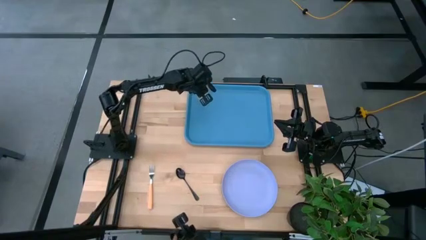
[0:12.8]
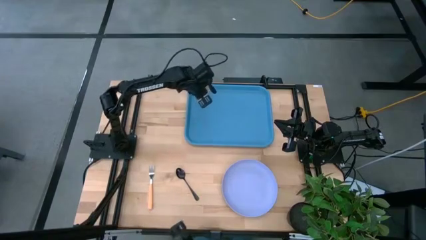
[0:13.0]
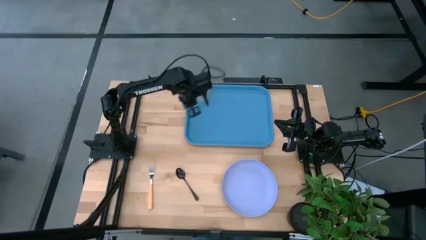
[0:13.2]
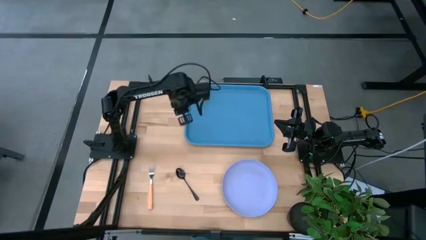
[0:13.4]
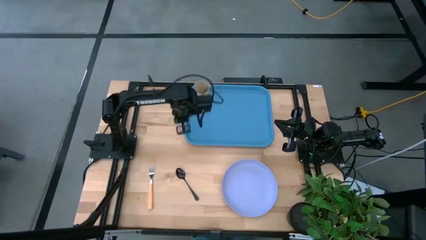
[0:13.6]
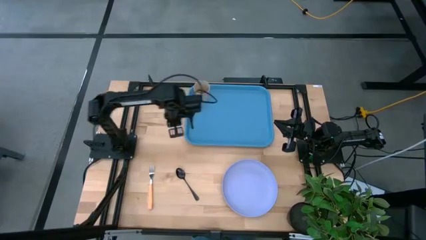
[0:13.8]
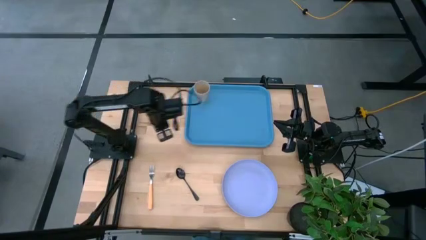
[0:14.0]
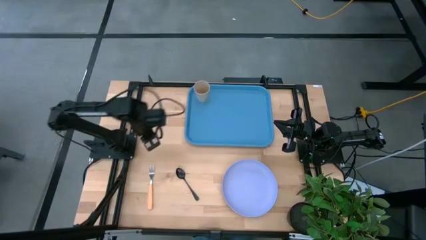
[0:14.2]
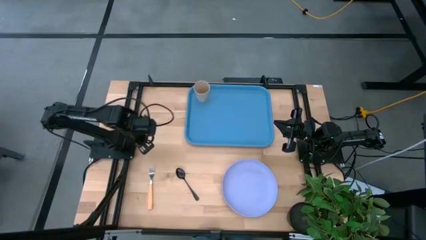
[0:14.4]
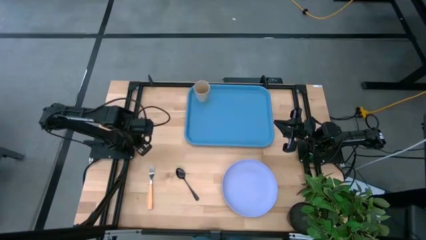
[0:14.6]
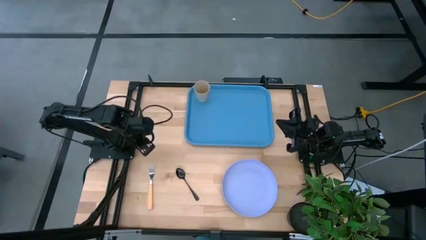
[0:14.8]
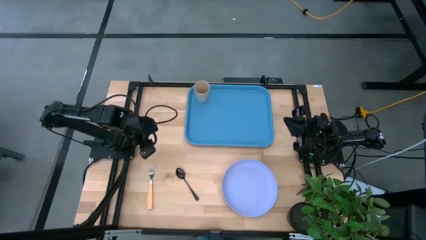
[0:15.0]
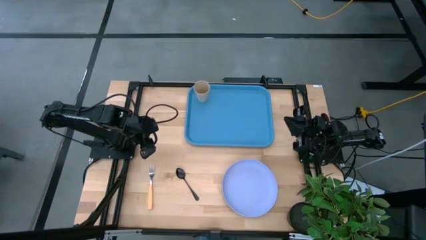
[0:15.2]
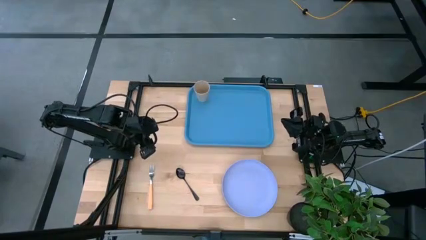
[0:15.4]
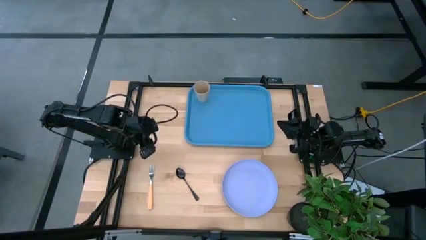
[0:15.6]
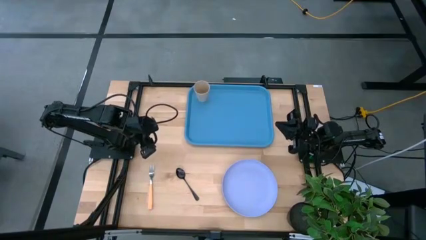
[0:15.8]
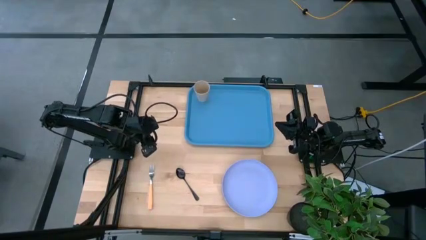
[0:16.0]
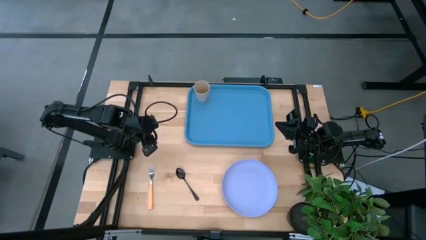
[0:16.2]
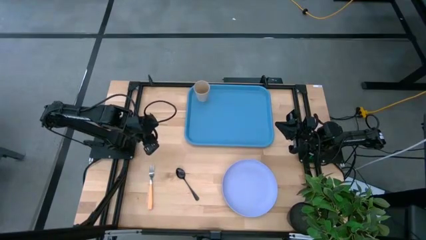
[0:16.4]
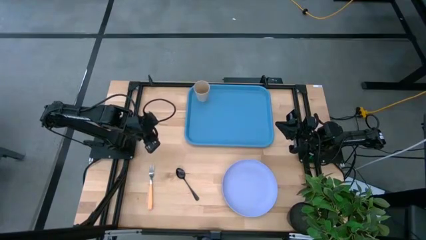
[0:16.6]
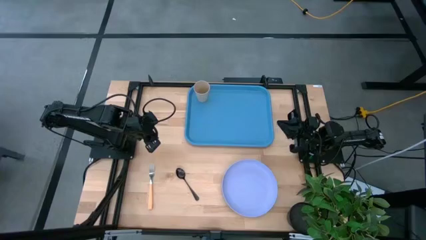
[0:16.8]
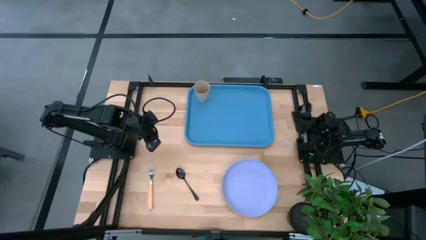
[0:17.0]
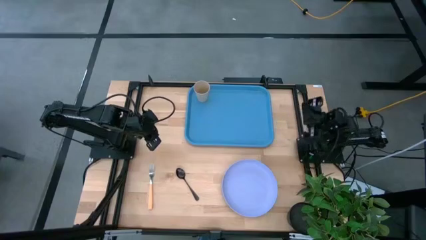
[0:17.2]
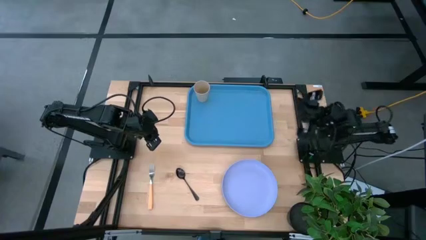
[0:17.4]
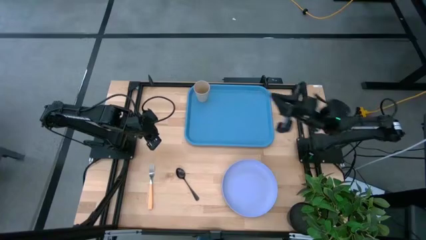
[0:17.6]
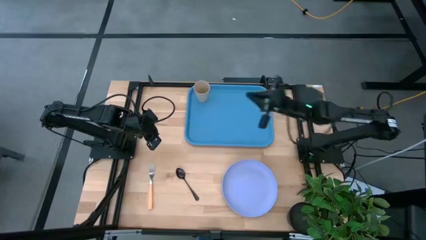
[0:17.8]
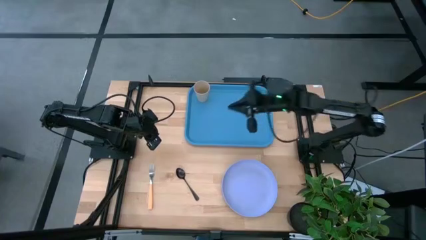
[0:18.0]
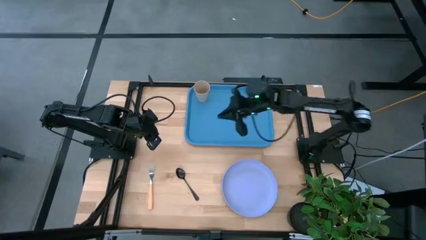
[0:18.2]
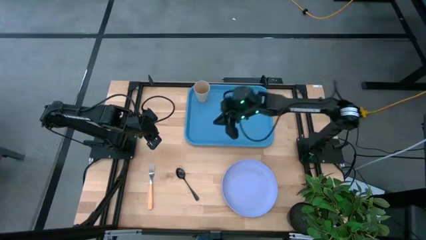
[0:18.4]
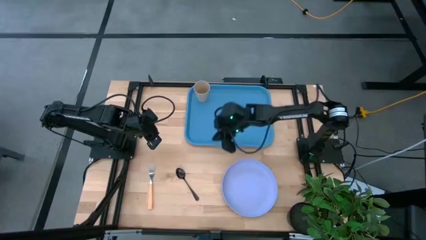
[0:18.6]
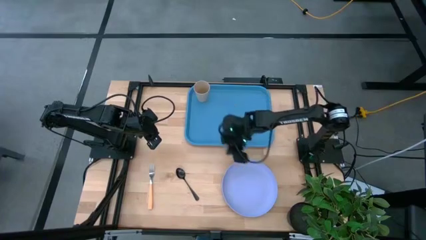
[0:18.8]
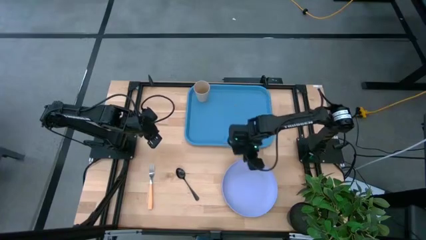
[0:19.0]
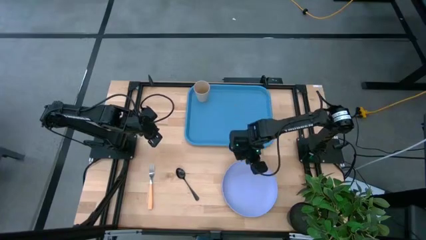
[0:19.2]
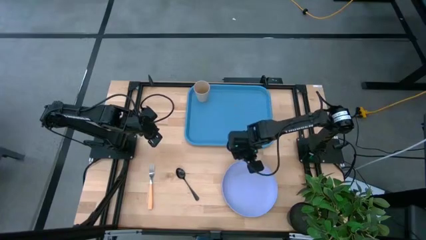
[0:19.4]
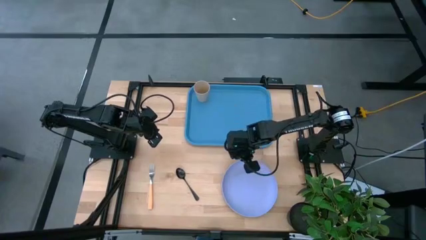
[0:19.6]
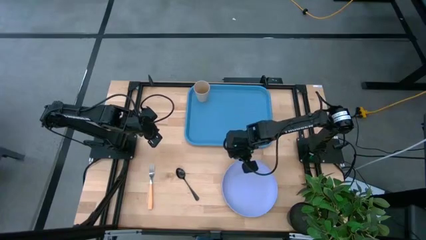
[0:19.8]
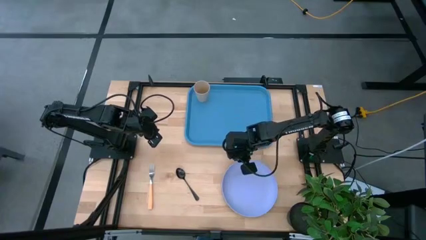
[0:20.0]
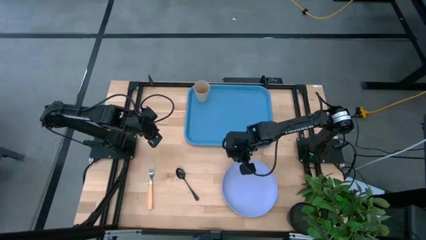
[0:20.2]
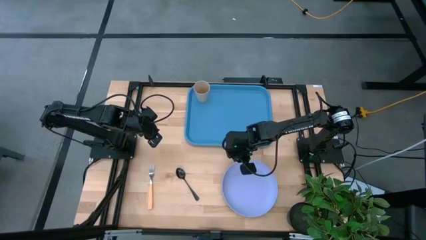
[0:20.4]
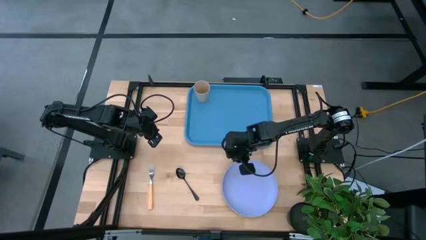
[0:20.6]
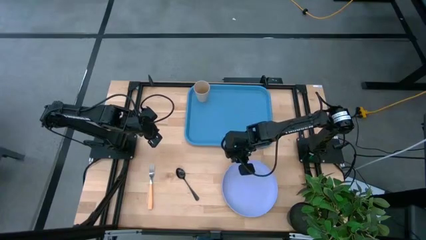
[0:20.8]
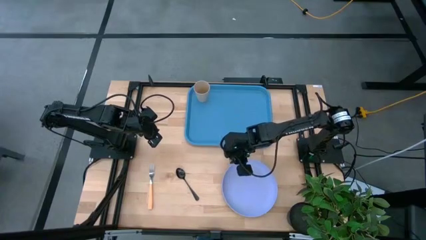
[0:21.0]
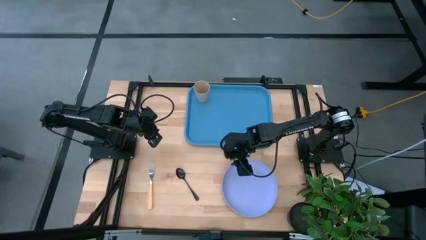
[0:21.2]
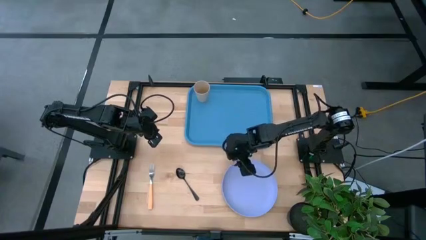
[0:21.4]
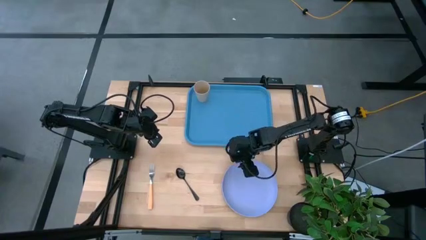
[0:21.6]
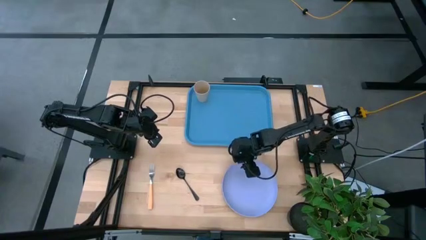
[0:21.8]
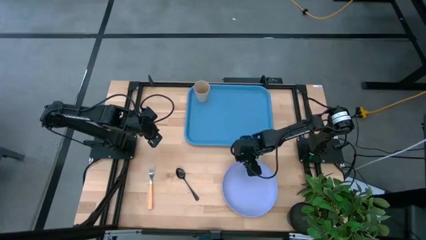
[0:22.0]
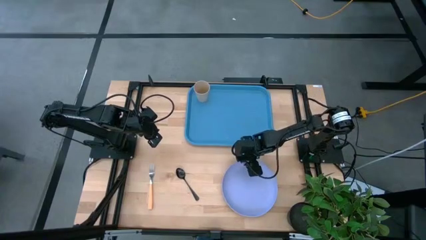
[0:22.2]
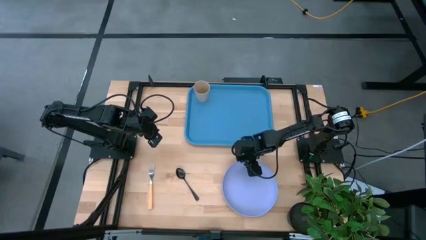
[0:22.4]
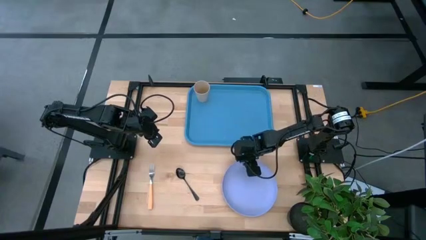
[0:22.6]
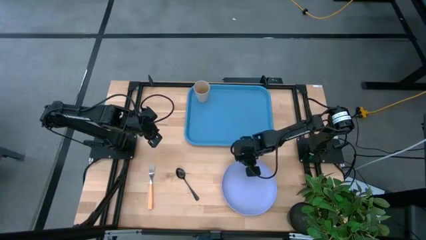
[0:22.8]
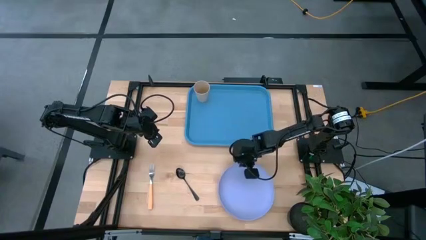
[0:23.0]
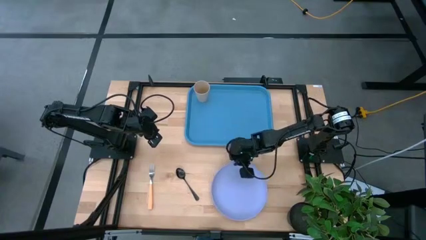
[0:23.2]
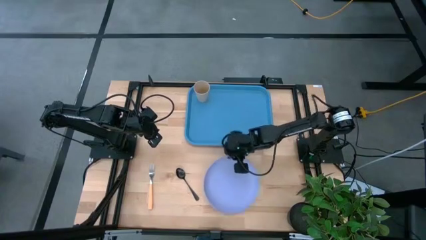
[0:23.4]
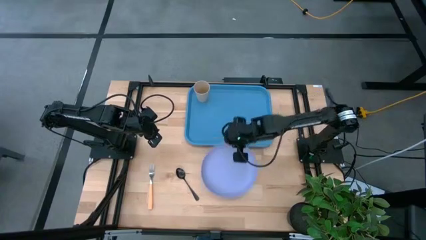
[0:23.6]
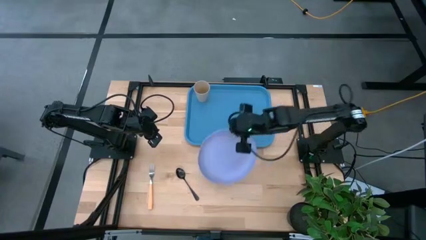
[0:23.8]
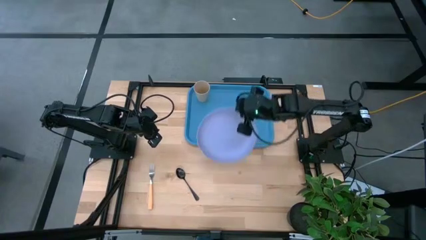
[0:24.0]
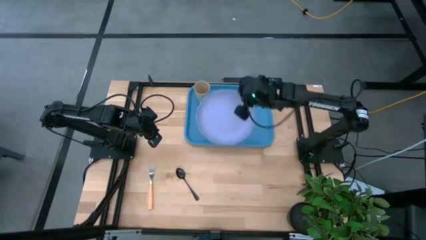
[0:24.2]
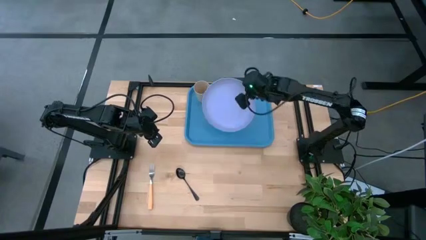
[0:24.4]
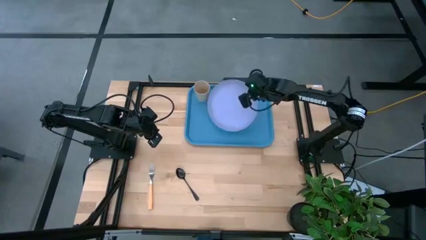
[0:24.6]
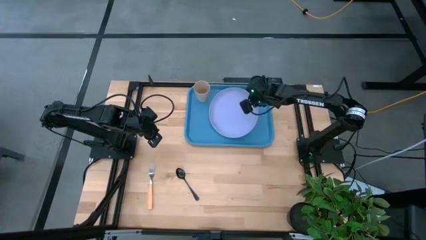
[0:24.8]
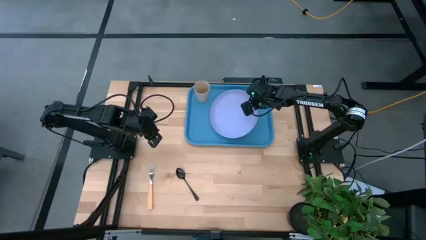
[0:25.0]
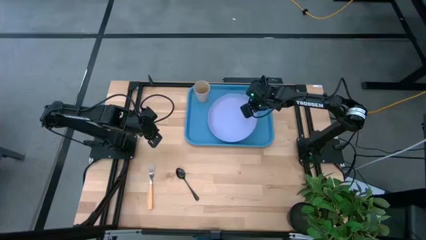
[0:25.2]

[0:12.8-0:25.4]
Task: Pick and place plate/cup/fork/spoon on tray
Put the purple plate on the blue tray to the bottom right of the white cup

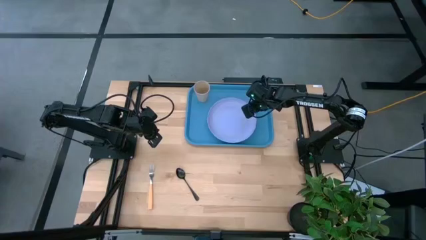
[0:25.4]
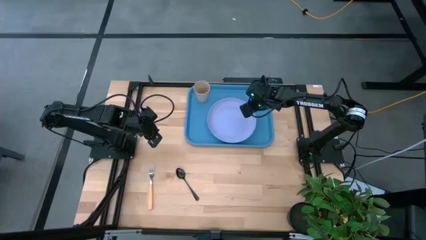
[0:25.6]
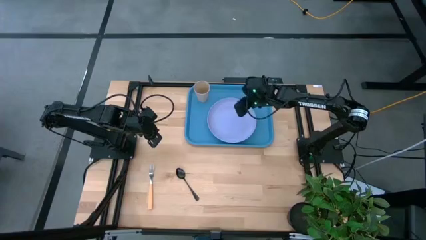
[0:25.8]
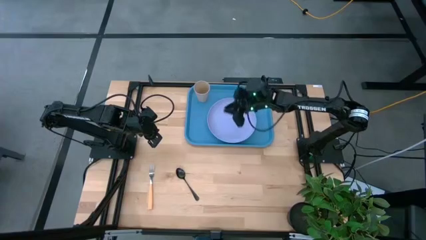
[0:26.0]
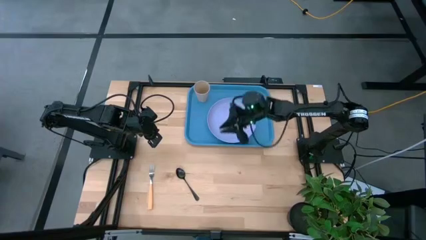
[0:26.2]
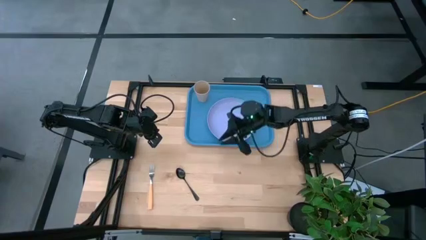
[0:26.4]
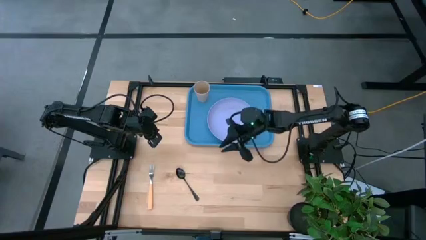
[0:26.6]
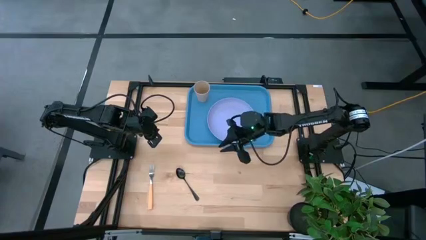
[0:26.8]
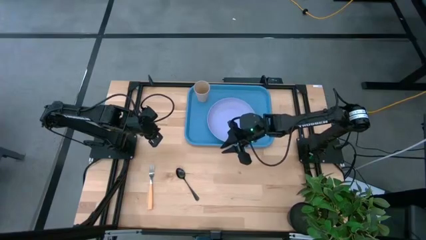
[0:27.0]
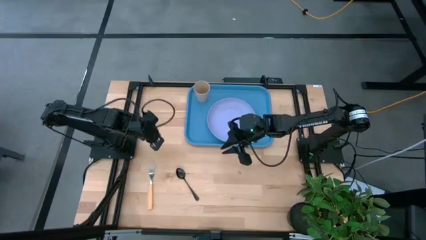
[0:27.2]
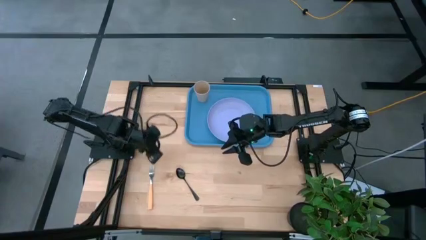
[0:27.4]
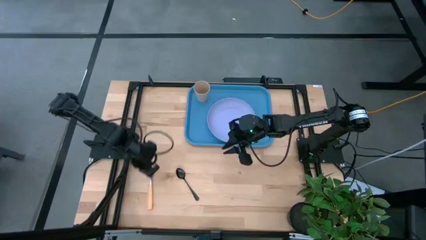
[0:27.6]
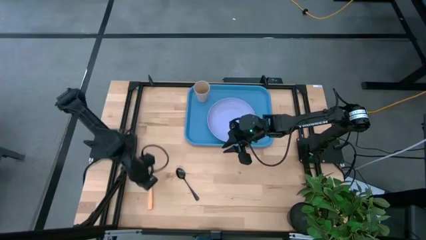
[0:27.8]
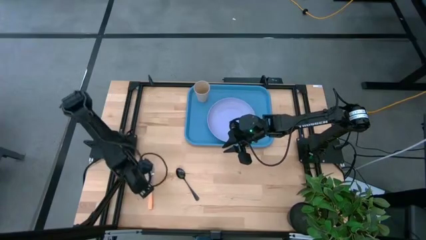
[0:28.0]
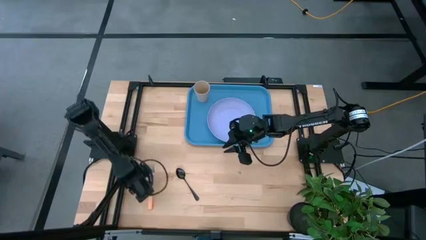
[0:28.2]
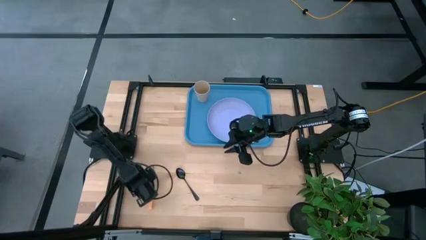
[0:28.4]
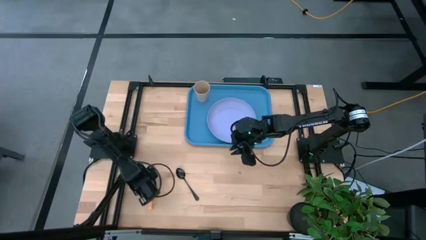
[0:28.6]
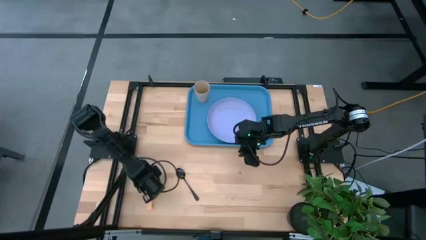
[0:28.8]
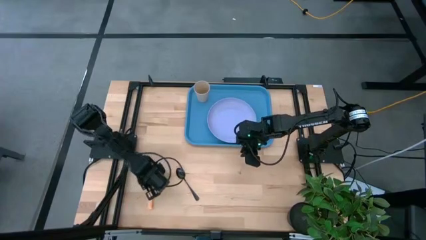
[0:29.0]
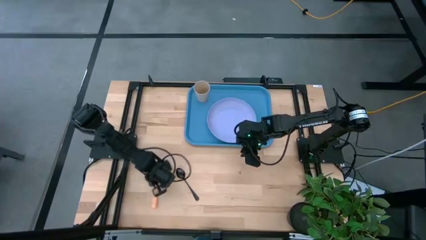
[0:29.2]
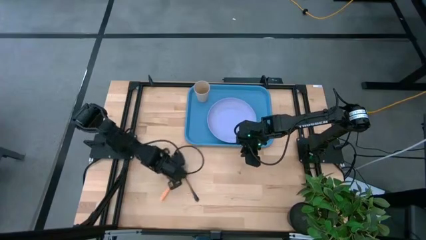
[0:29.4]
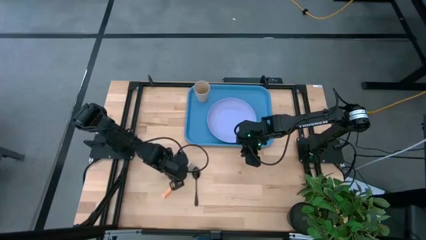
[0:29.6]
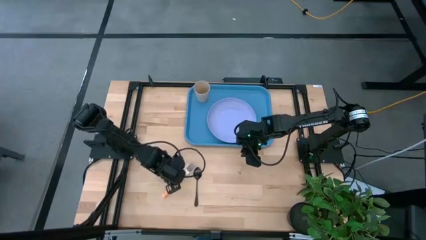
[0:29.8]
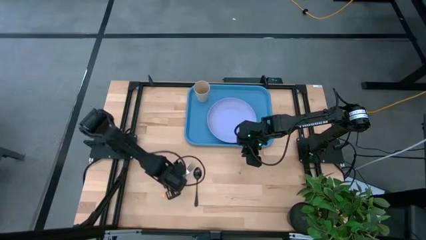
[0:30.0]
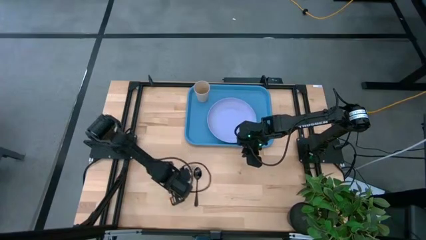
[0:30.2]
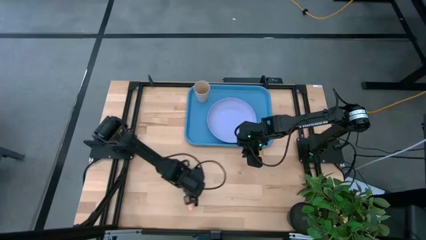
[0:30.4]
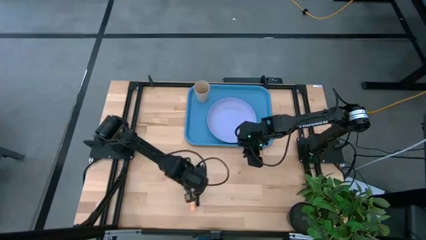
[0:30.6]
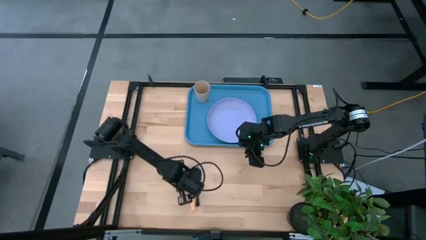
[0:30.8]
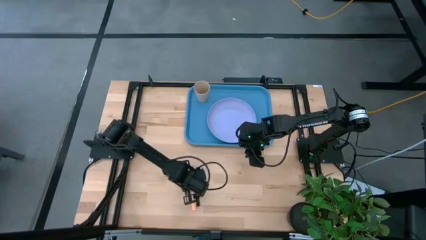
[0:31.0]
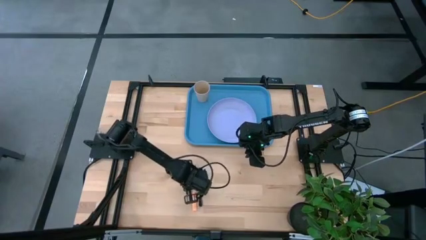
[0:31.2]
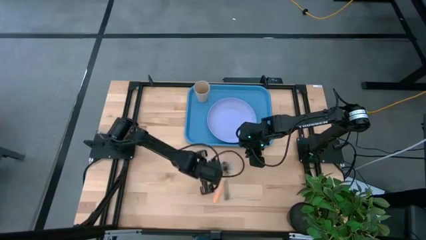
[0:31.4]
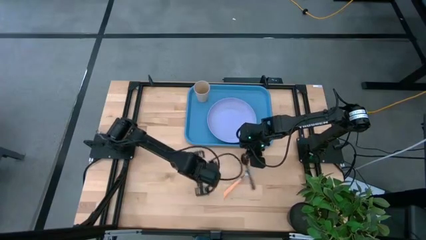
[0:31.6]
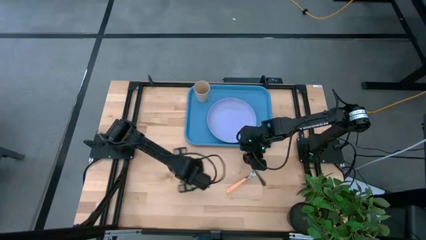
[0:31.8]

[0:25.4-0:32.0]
Move the spoon and fork towards the right
